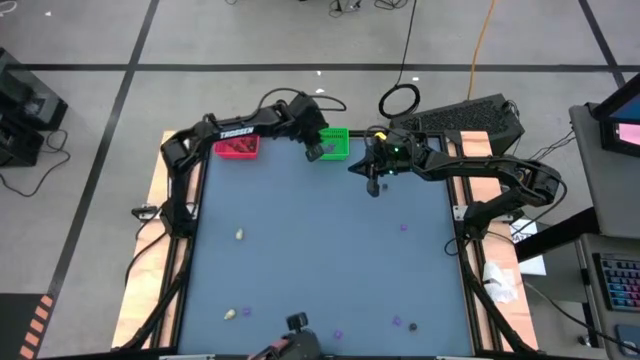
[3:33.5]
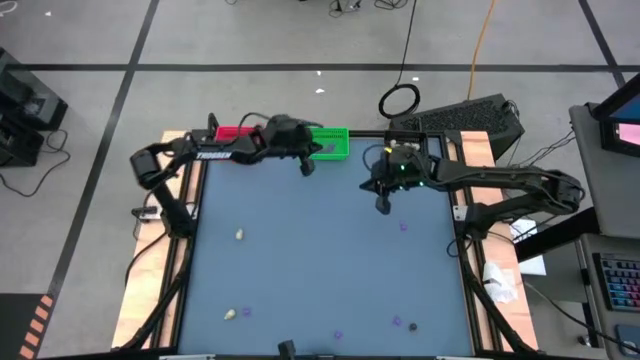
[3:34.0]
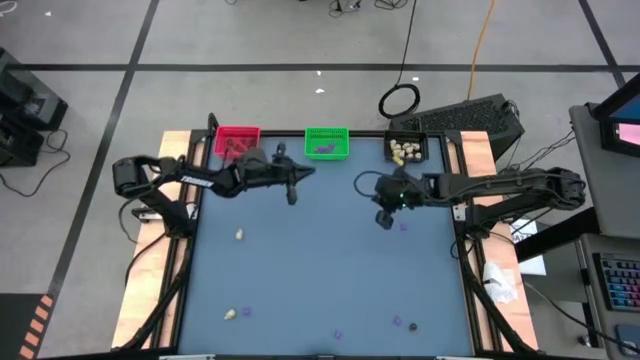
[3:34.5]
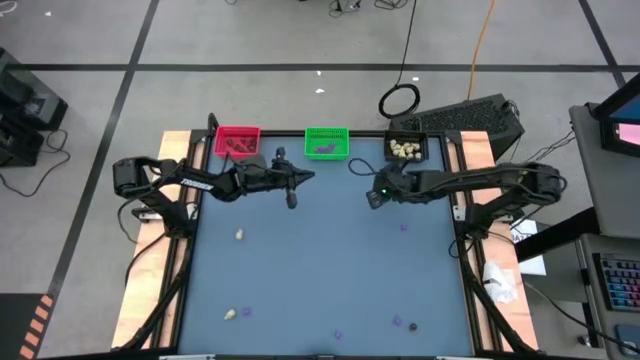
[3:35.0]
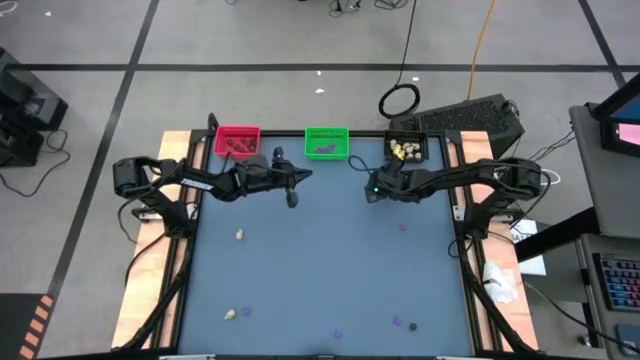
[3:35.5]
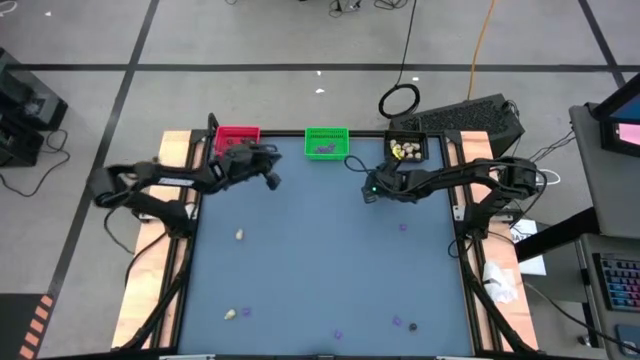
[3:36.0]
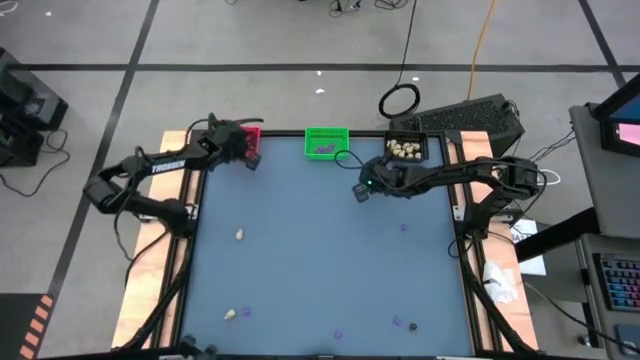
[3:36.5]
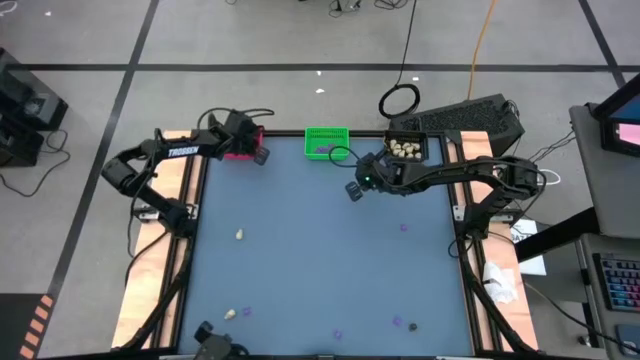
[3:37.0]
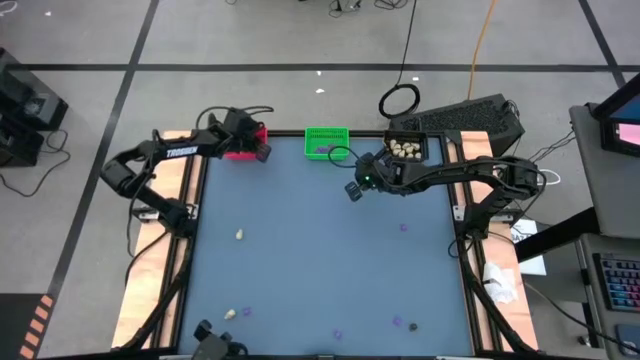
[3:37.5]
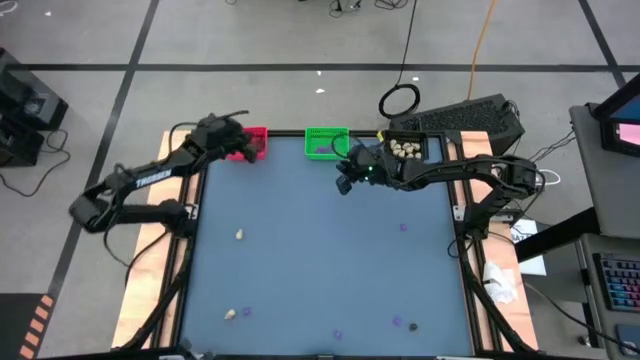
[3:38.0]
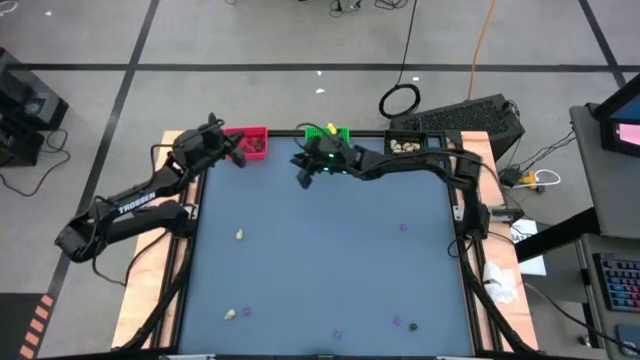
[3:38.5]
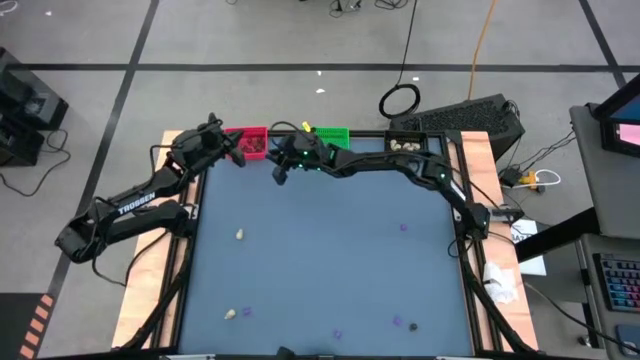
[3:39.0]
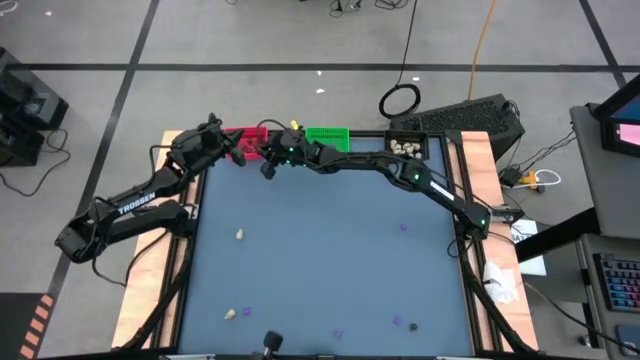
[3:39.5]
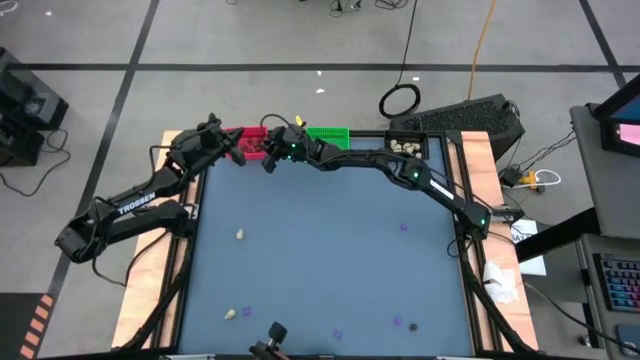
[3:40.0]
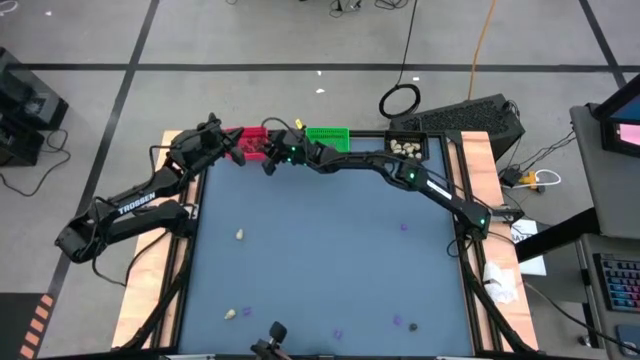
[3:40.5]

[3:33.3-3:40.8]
Task: Sort Halloween decoration
Put the black skull toy into the red bin

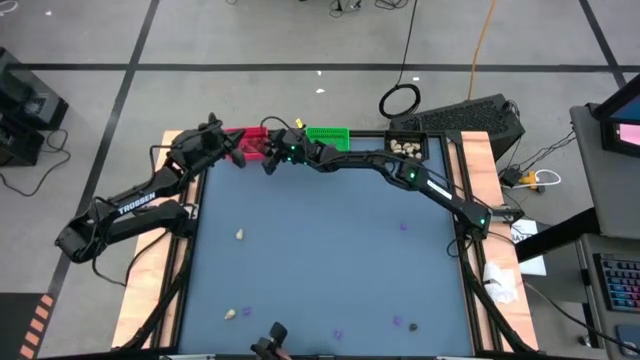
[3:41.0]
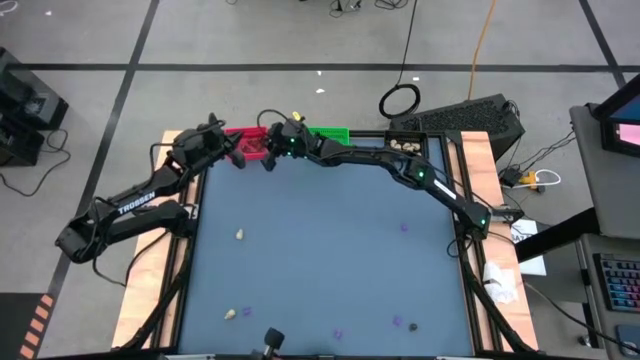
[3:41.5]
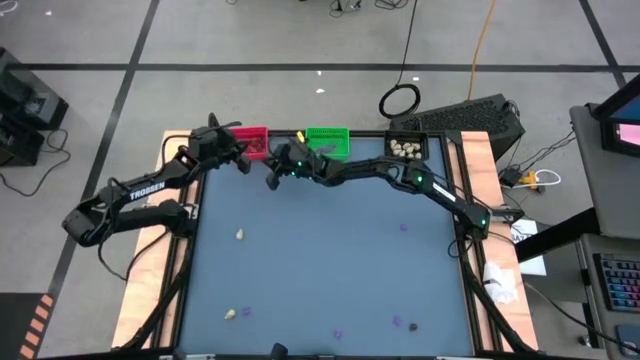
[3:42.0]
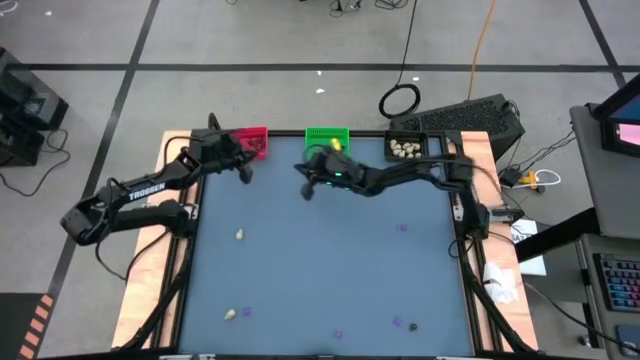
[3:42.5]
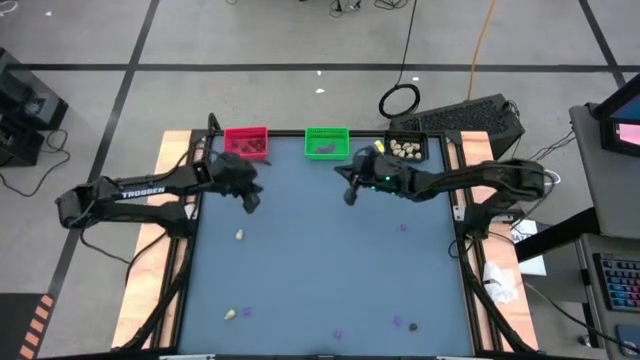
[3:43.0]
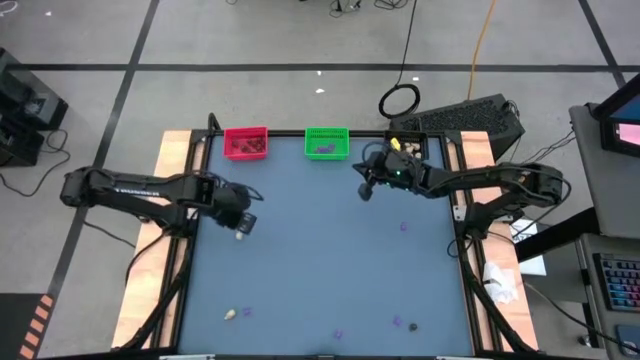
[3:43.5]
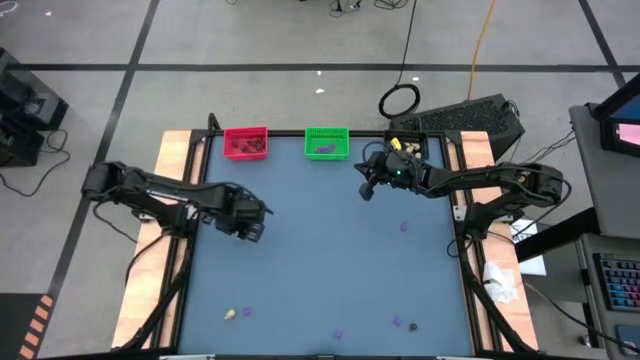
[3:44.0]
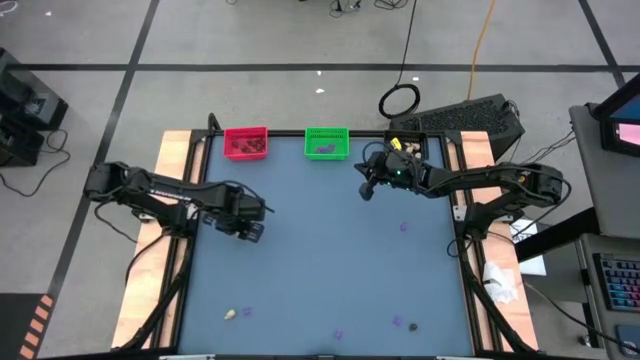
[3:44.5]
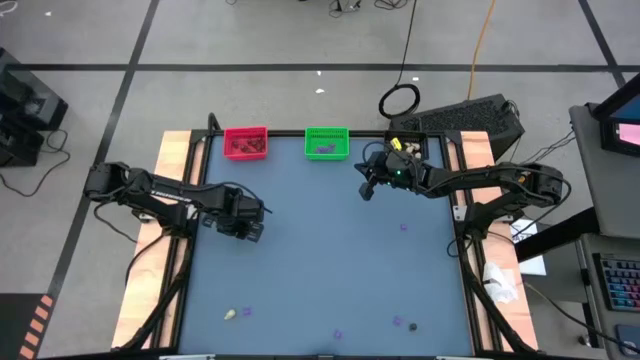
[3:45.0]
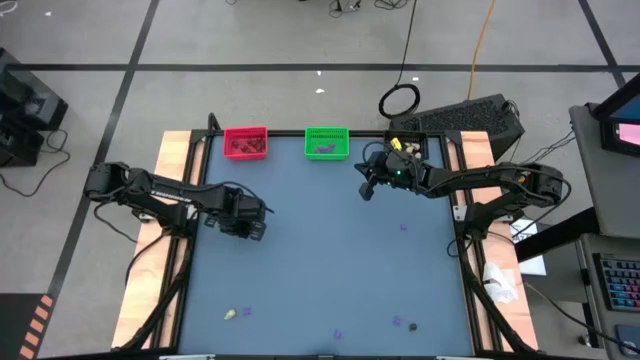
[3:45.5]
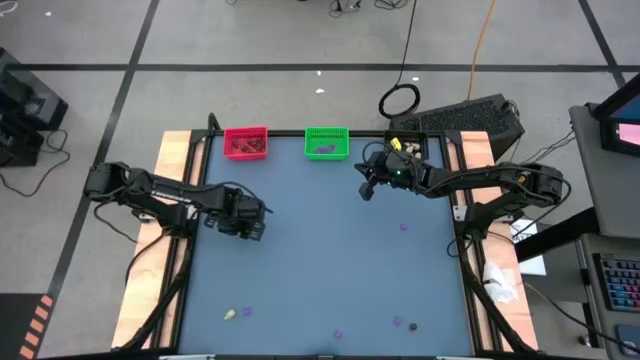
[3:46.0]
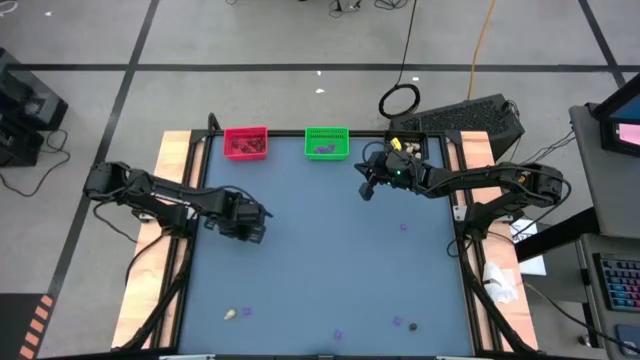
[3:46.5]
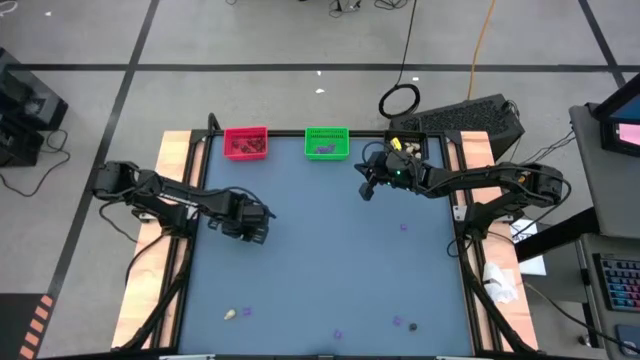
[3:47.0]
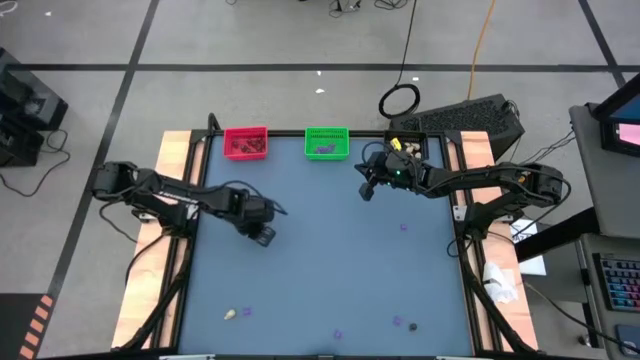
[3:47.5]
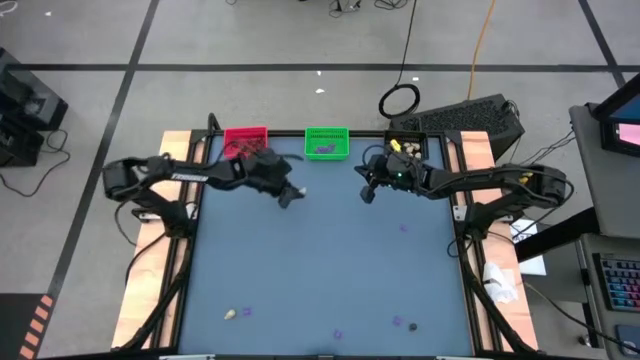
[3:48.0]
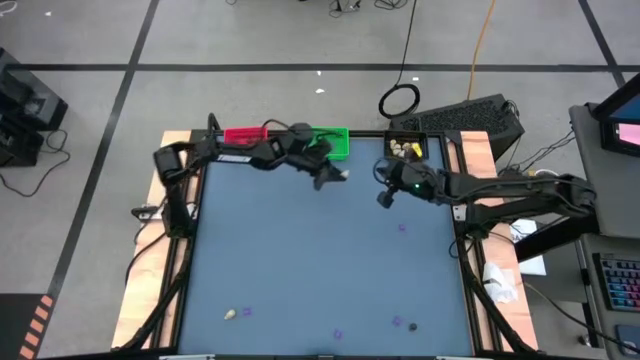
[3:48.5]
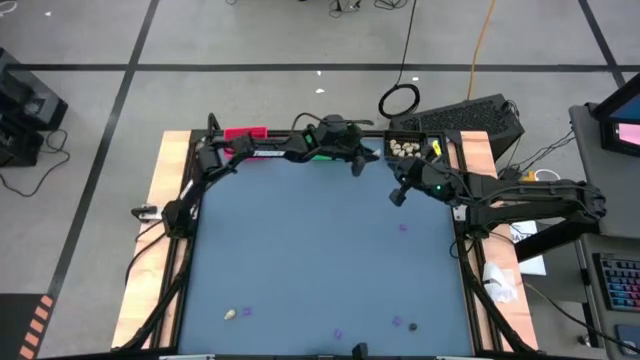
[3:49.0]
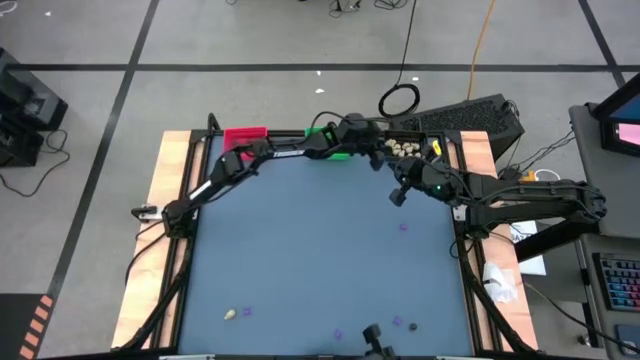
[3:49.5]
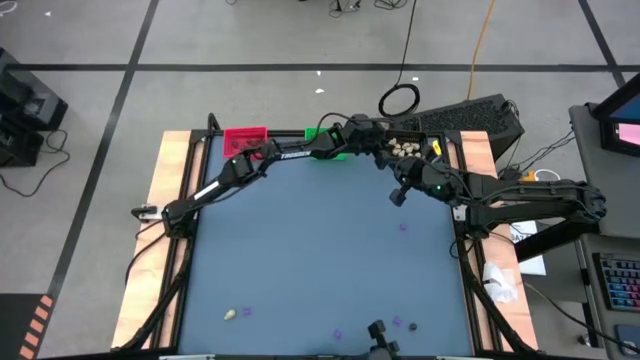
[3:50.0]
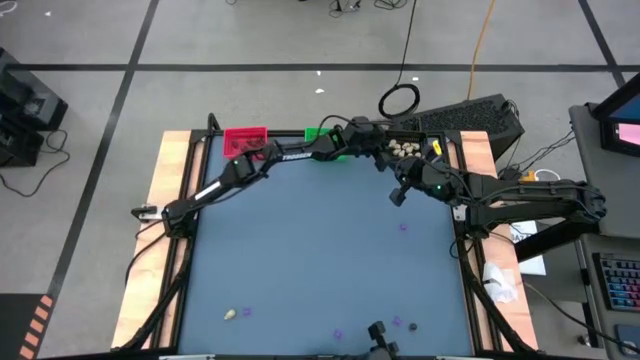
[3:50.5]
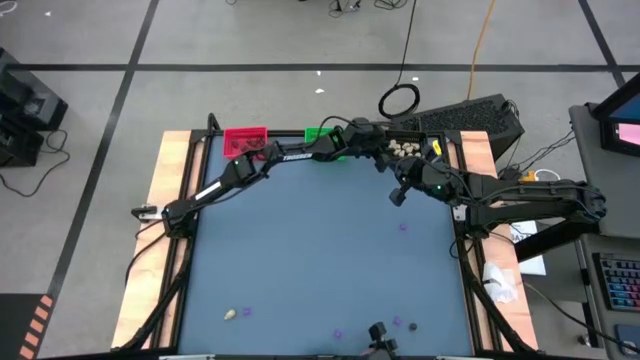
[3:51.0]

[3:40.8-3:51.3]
Put the white skull toy into the black bin

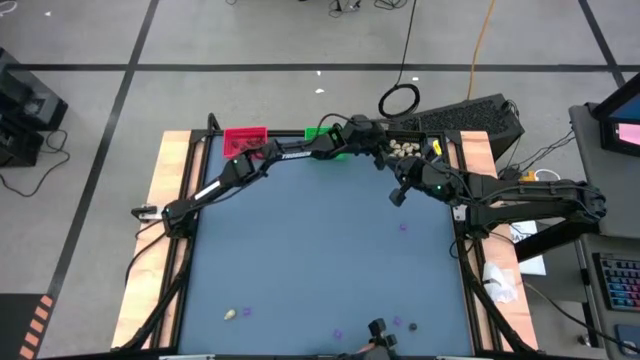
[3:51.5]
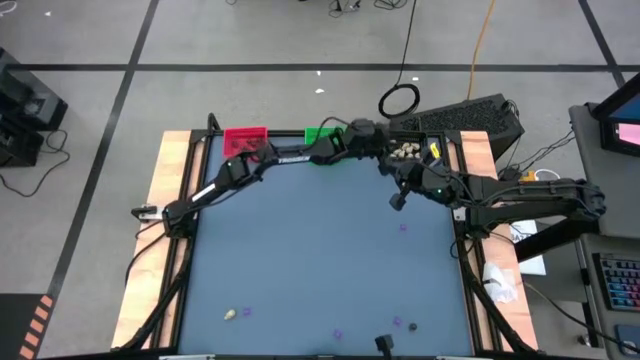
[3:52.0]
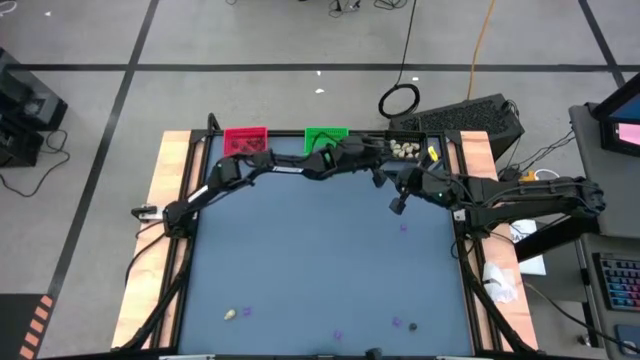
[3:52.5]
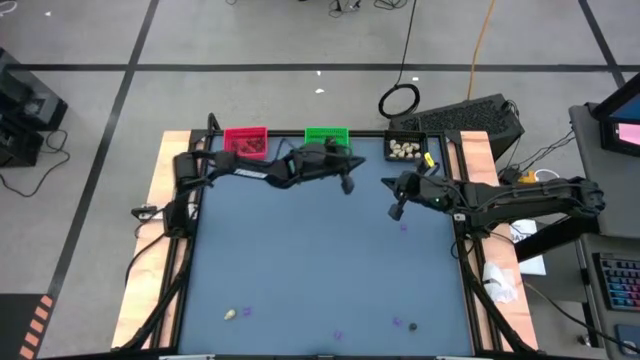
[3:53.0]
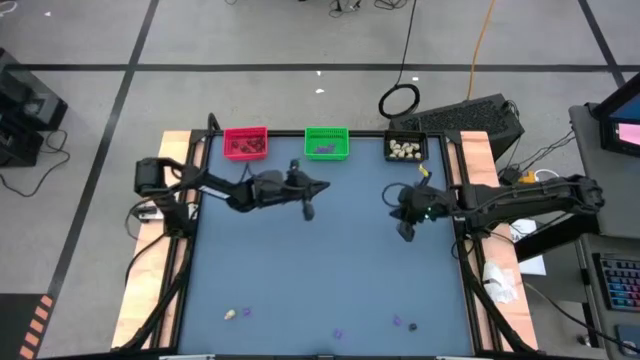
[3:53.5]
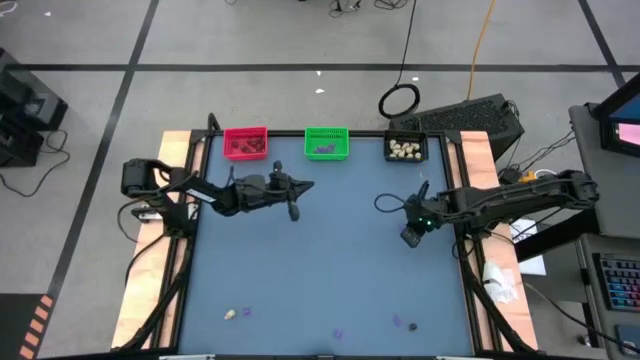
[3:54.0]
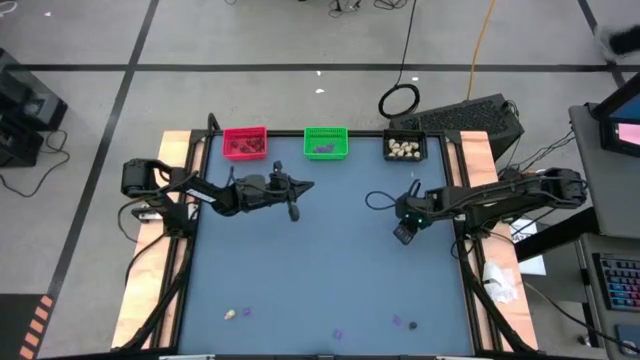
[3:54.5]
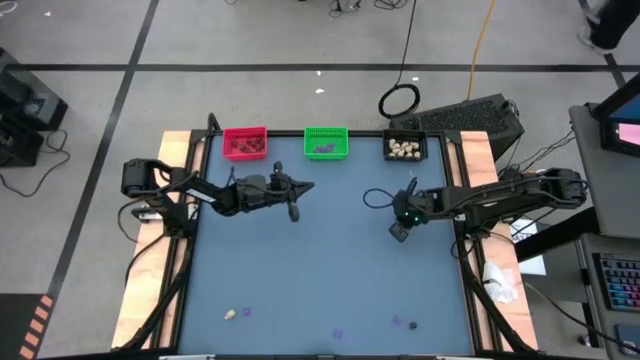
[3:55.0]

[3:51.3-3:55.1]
Put the purple spider toy into the green bin
